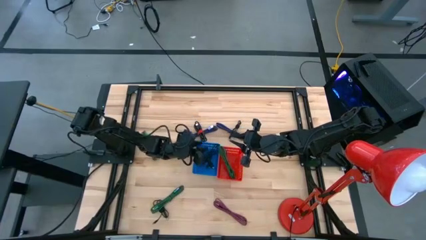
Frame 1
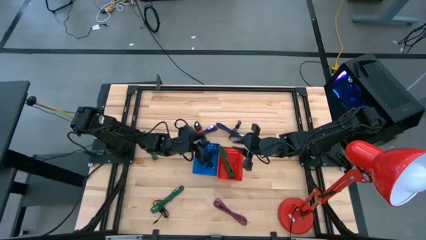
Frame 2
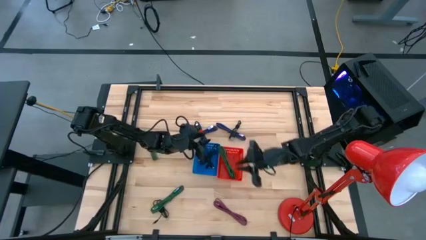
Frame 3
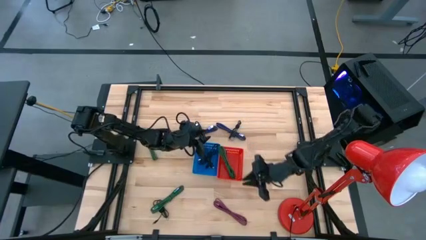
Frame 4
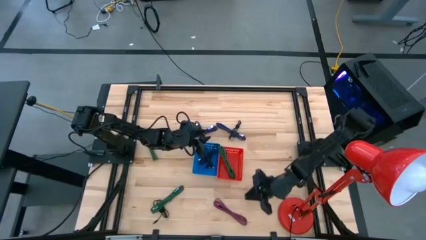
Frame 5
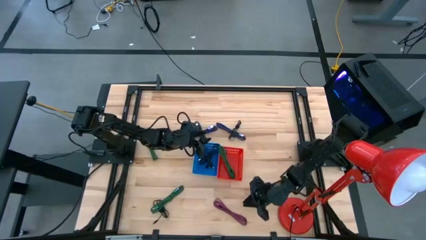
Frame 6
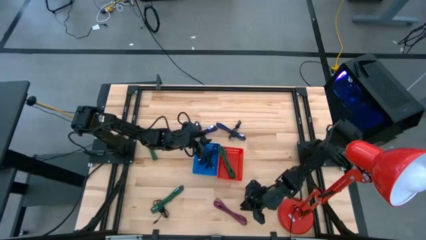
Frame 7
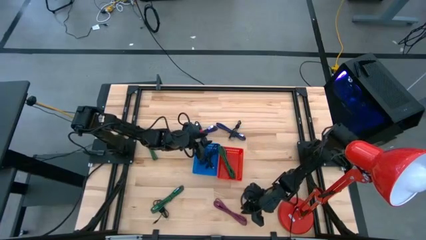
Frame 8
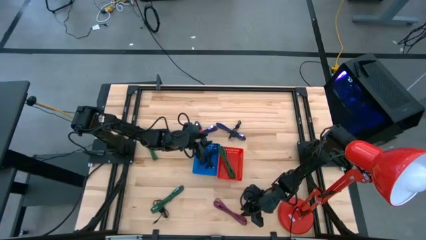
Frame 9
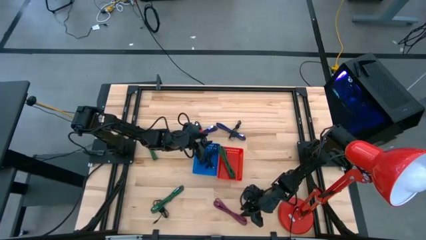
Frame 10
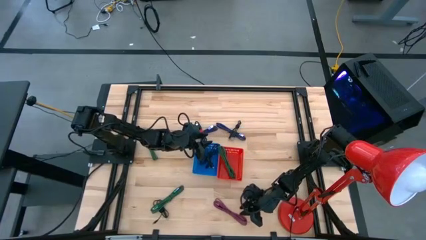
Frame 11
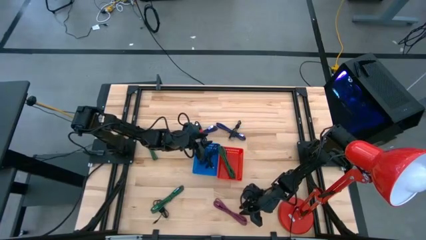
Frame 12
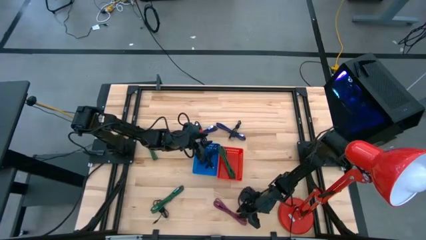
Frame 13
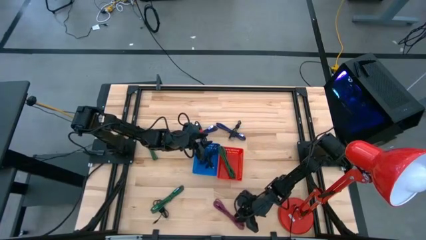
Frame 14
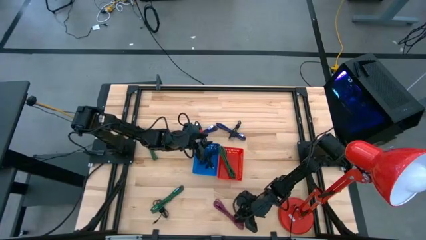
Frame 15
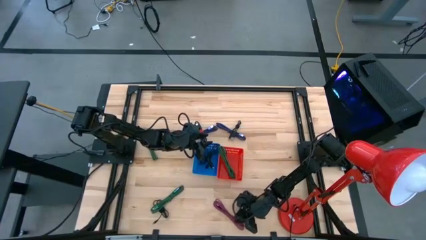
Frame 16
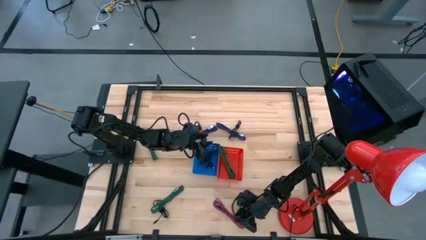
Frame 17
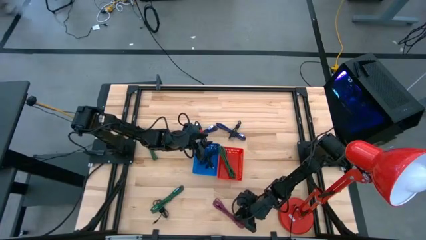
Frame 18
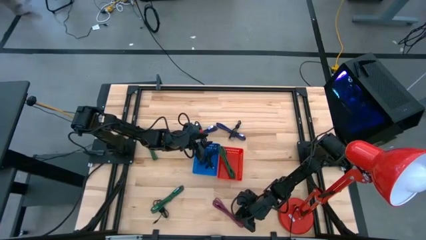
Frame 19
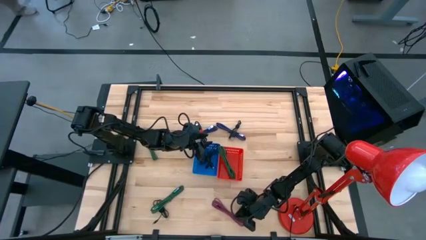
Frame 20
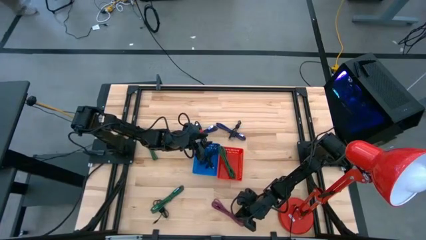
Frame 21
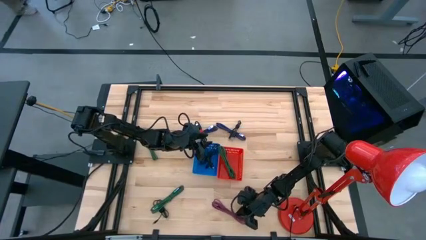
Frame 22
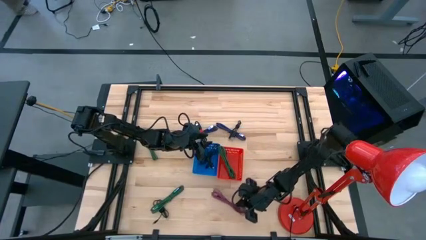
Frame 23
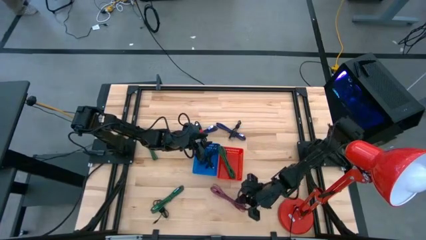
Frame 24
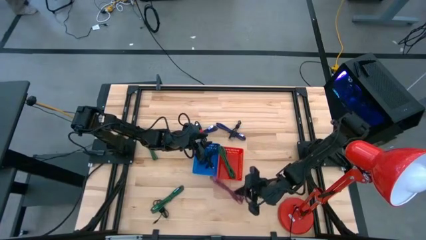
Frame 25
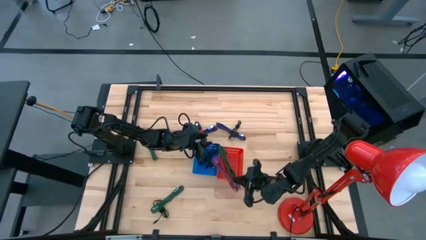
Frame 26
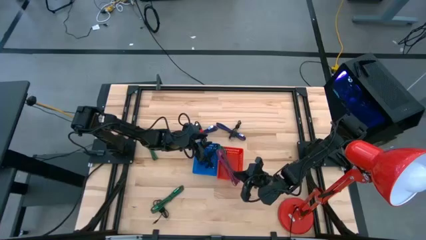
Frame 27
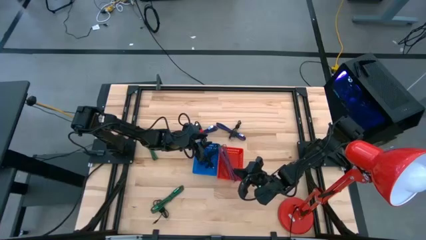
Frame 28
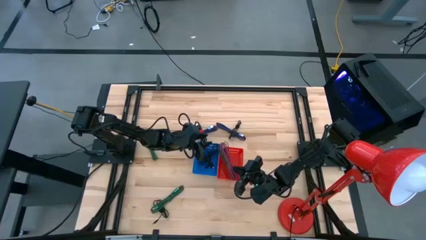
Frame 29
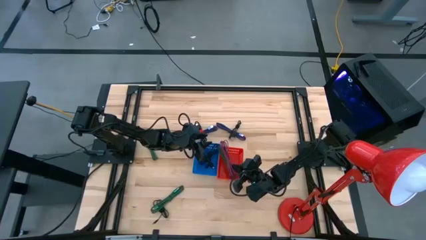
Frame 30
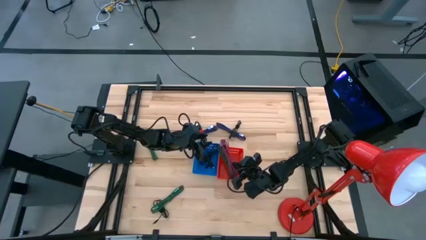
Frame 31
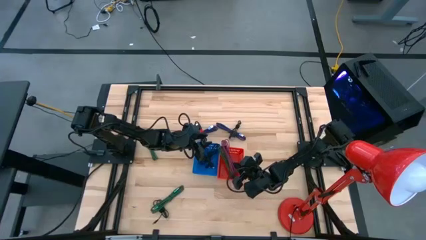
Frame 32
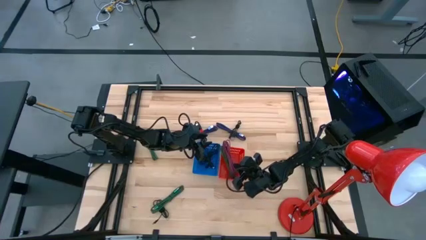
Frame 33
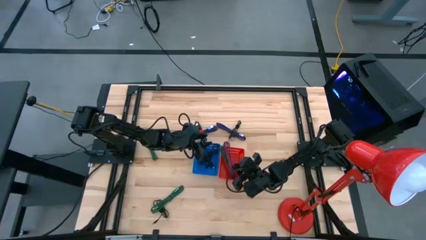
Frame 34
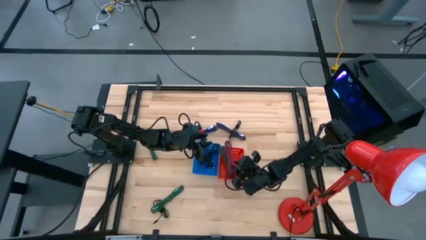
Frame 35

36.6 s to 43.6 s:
Task: Pick & Place USB Port
Put the black and pink USB cable into the red basket

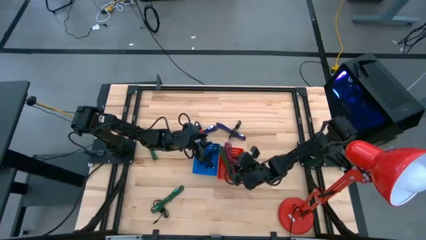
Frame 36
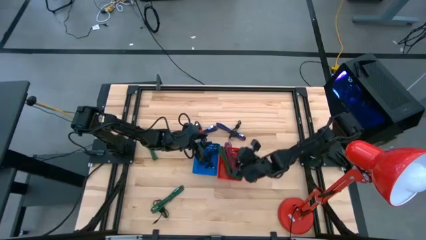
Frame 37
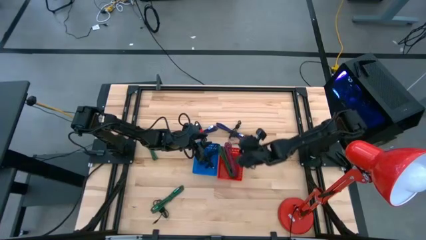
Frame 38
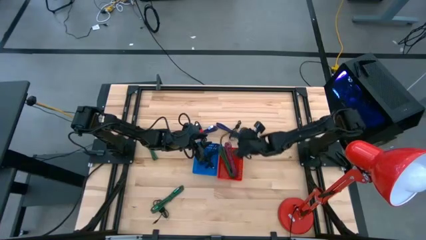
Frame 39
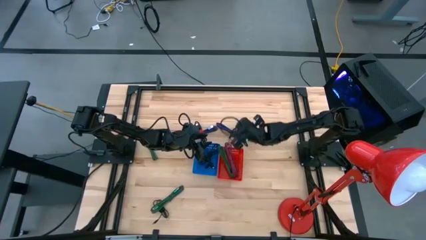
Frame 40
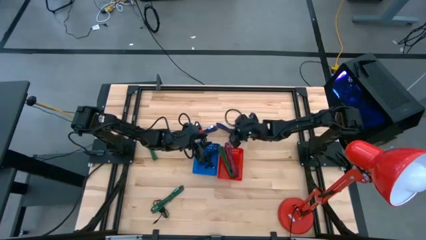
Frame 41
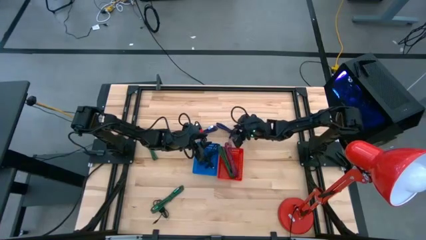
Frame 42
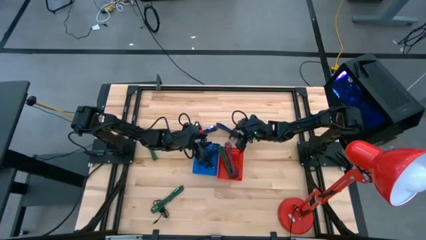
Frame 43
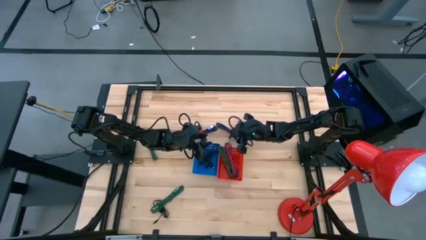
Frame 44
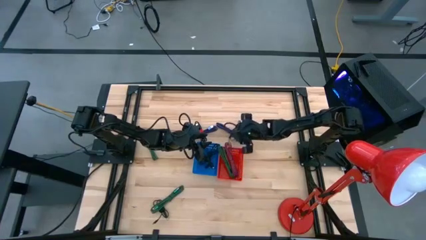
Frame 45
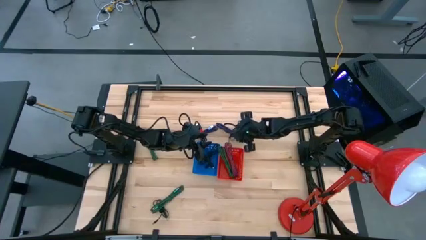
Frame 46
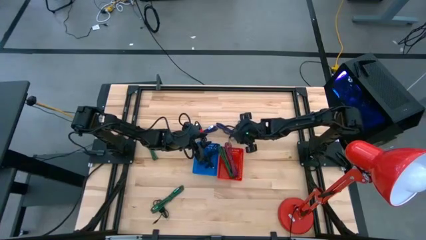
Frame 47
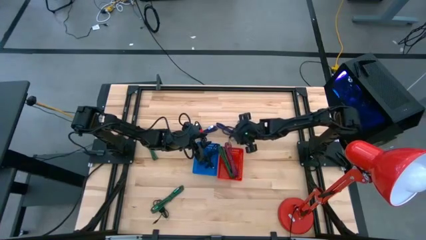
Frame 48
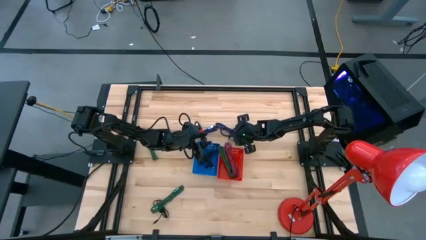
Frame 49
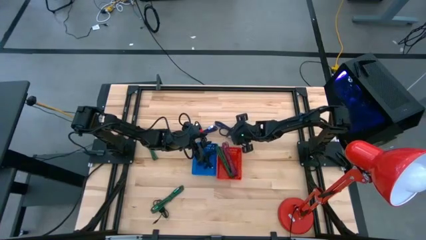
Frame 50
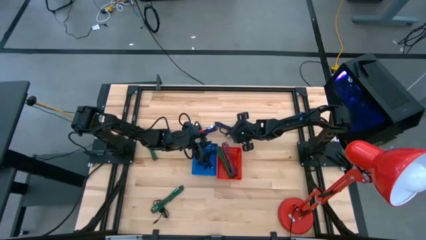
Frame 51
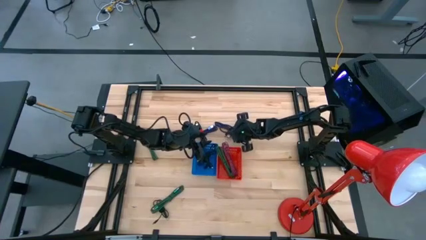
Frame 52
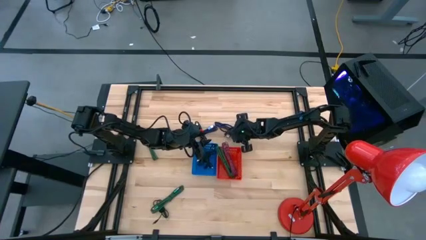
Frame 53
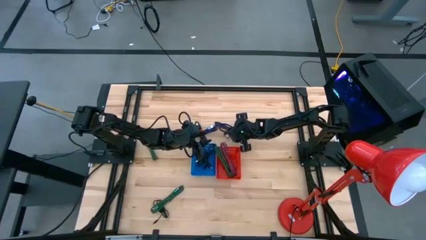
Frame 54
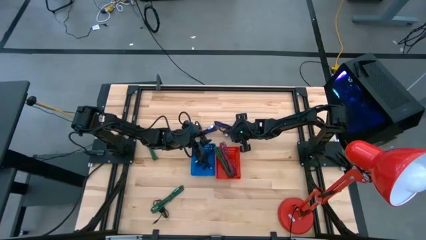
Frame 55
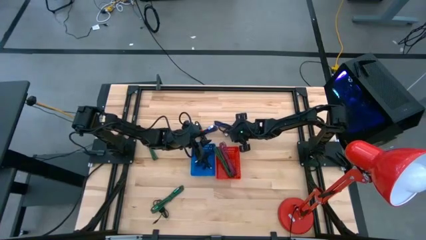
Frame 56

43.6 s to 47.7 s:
Put the black USB cable into the blue basket
